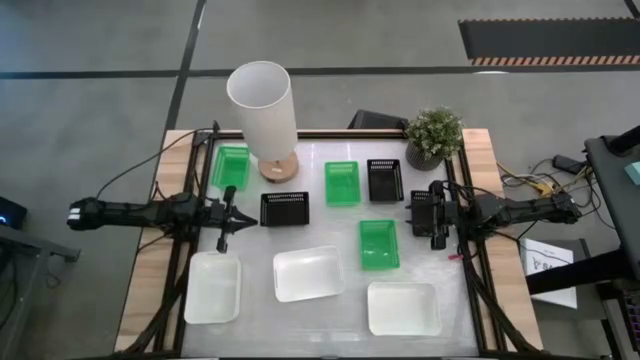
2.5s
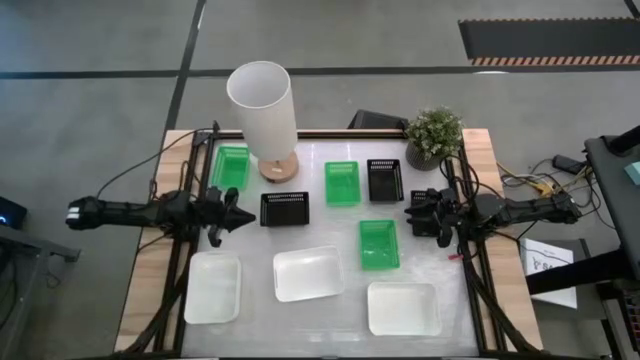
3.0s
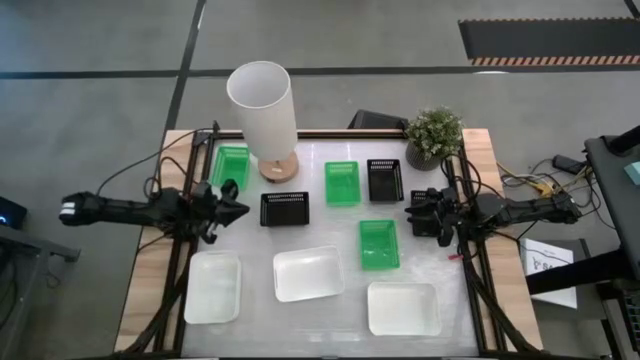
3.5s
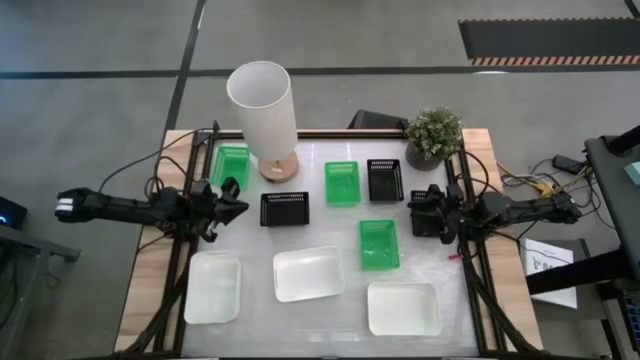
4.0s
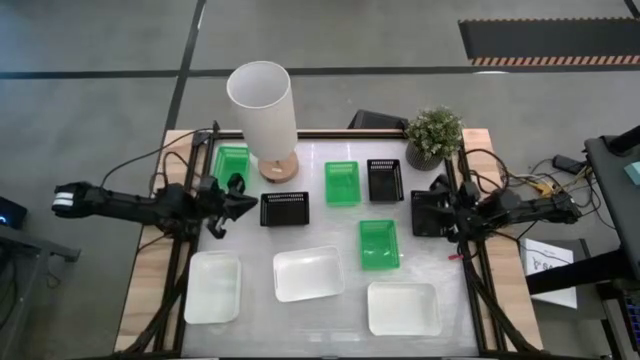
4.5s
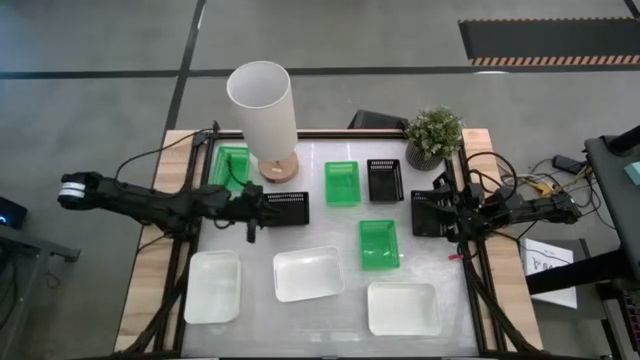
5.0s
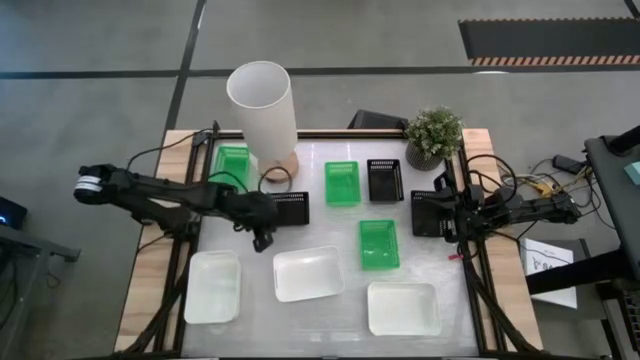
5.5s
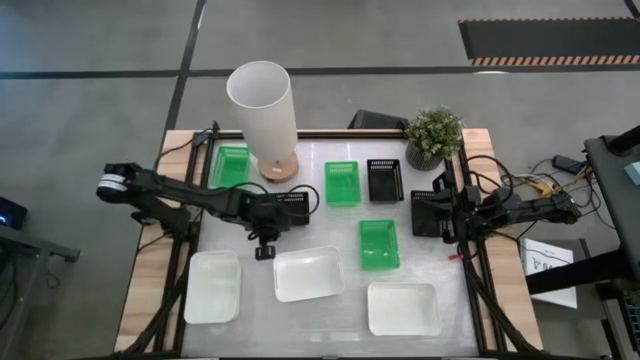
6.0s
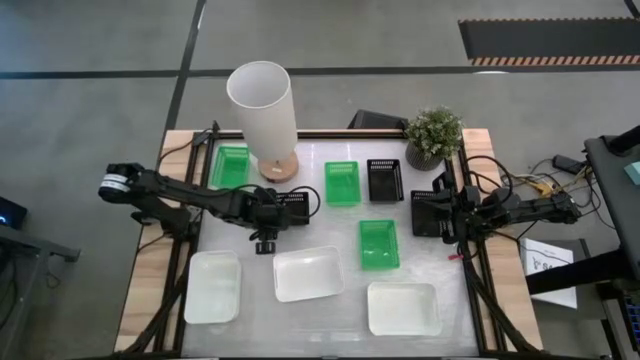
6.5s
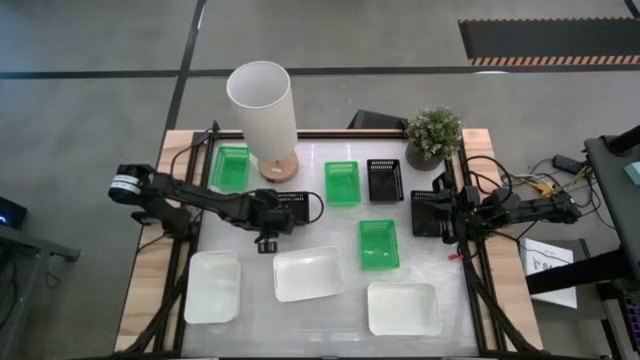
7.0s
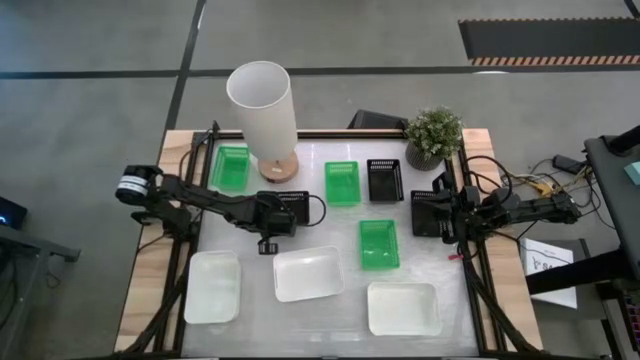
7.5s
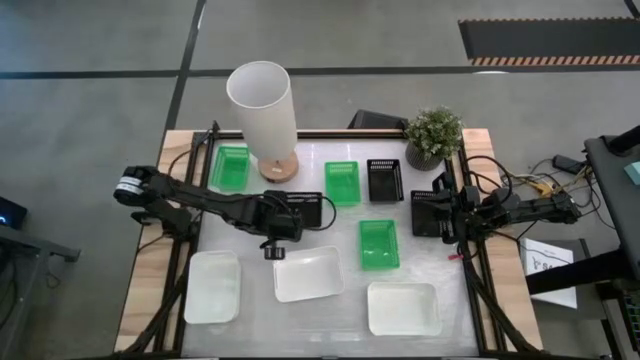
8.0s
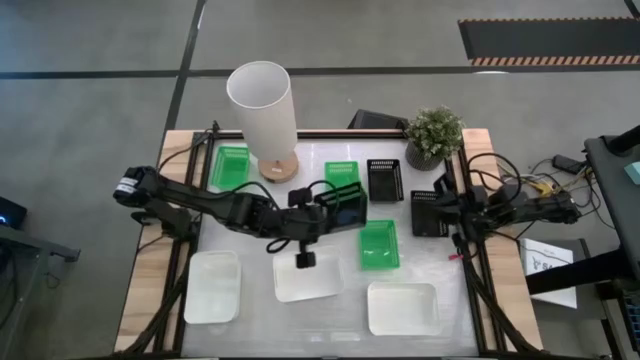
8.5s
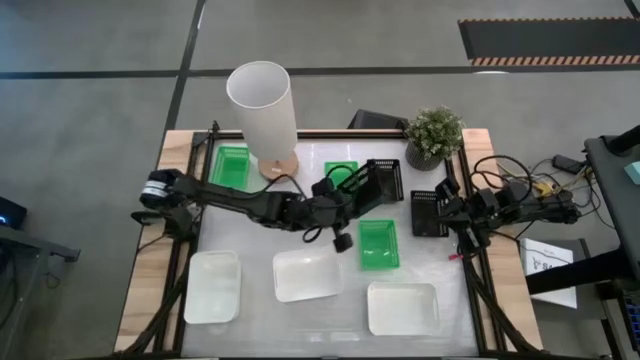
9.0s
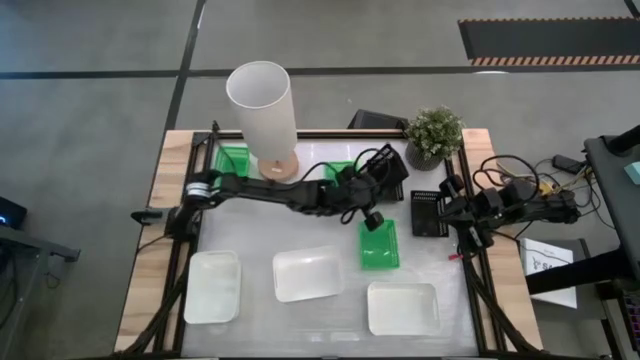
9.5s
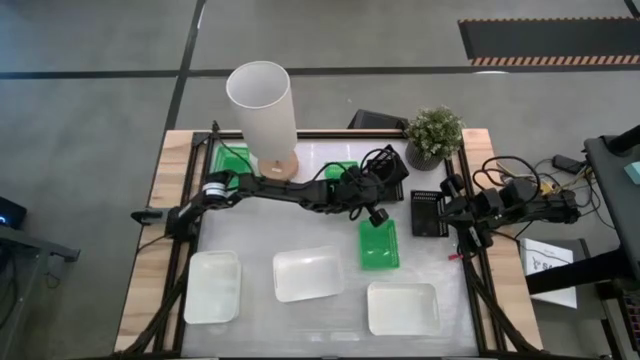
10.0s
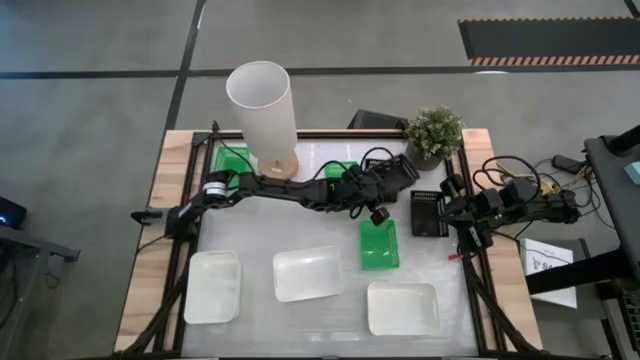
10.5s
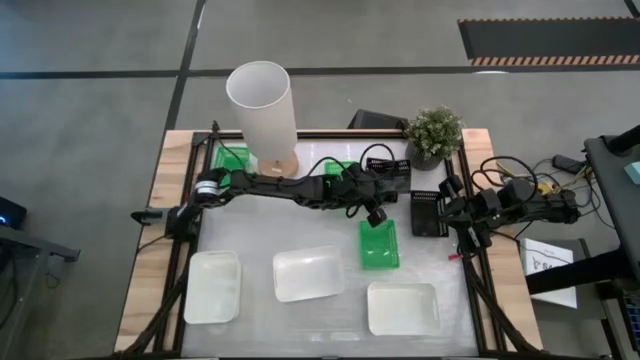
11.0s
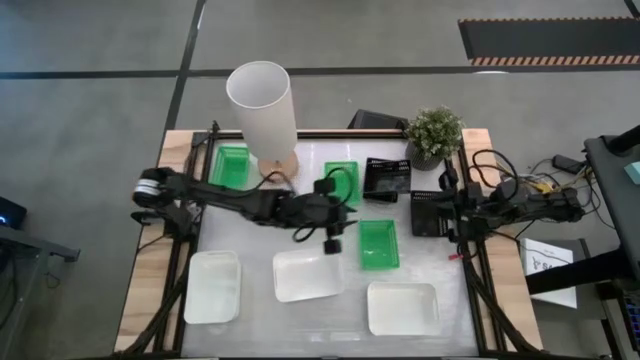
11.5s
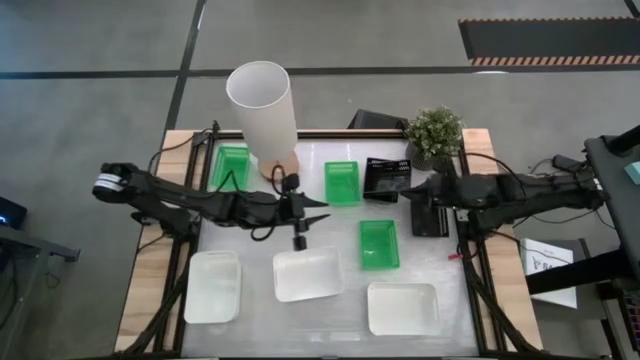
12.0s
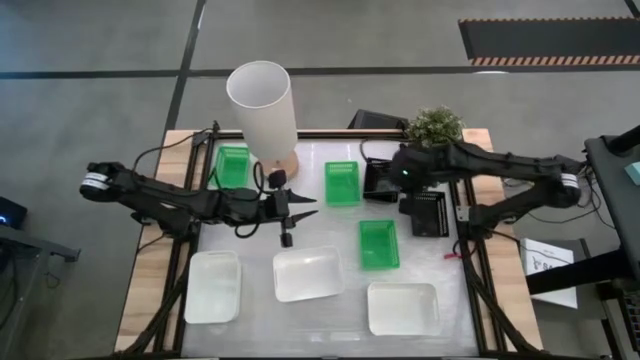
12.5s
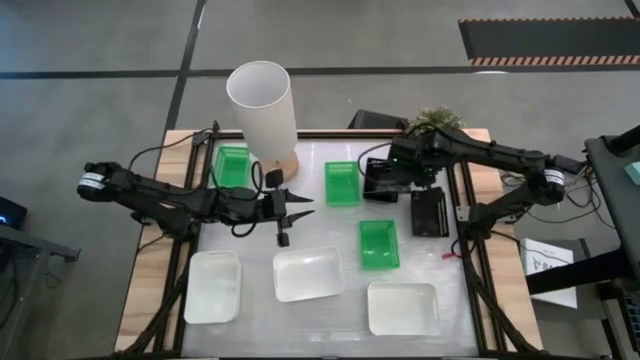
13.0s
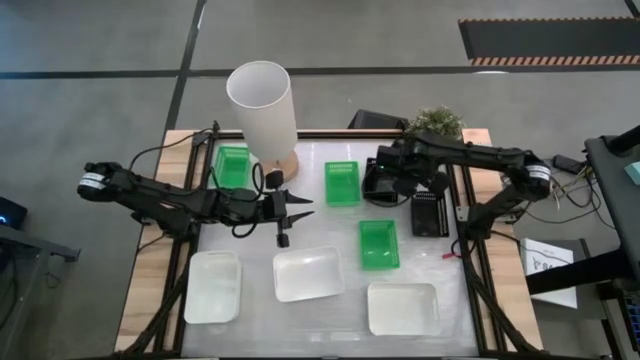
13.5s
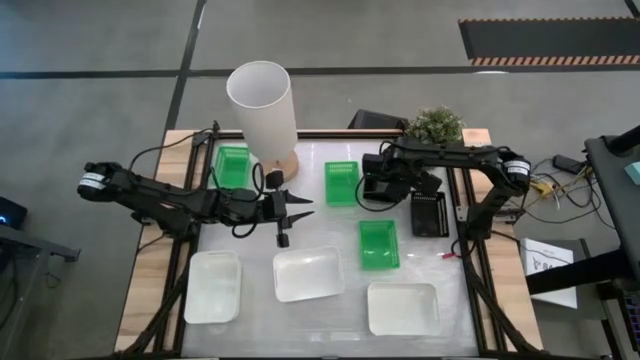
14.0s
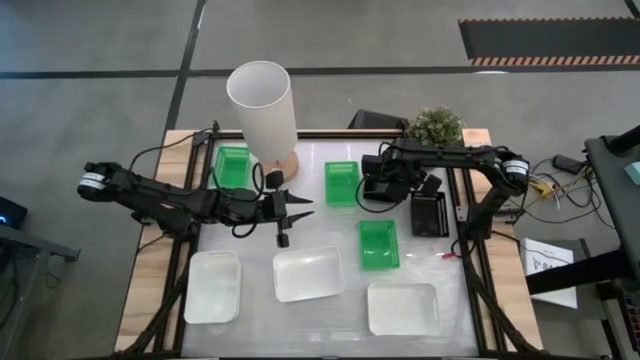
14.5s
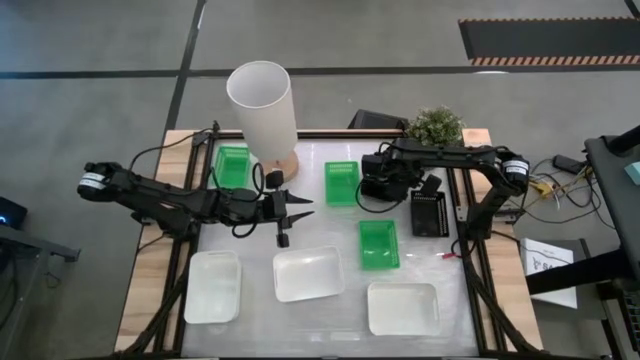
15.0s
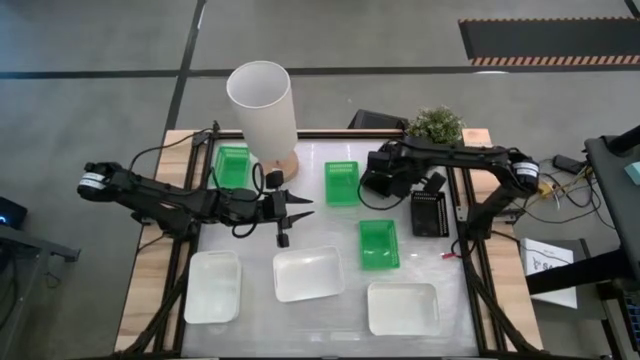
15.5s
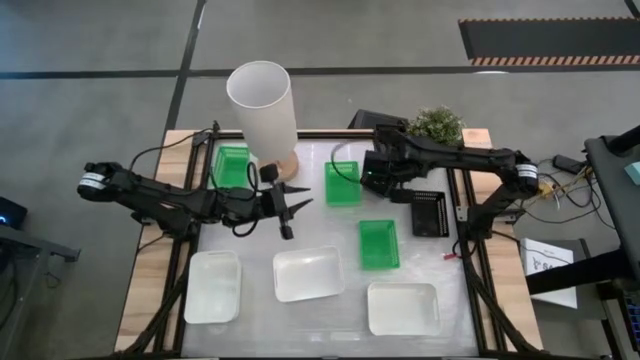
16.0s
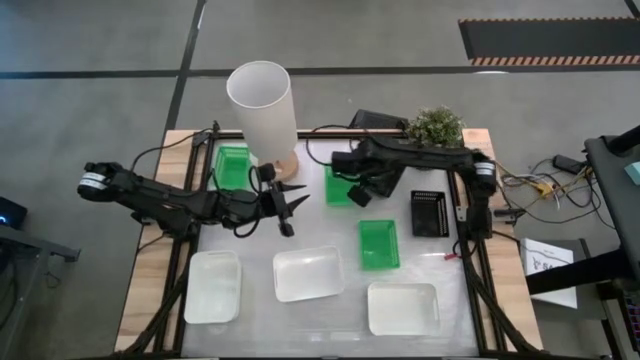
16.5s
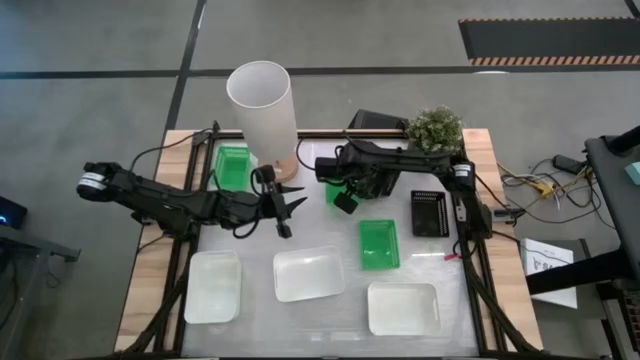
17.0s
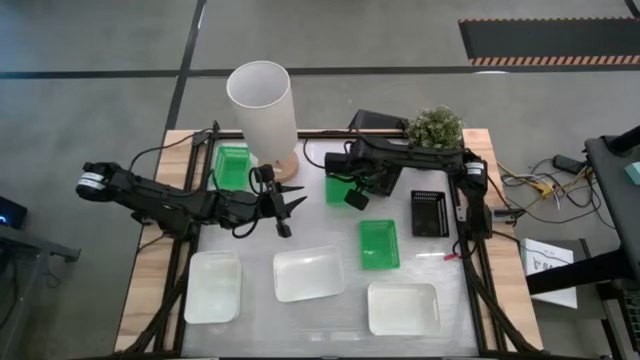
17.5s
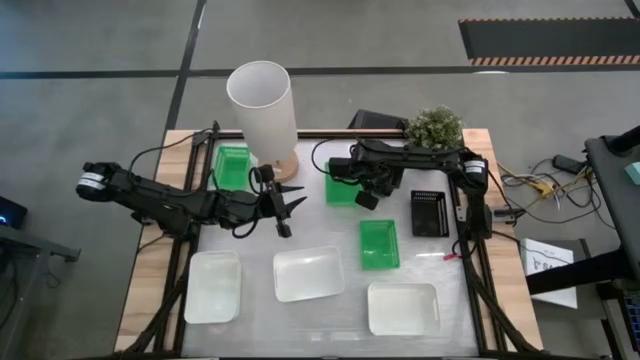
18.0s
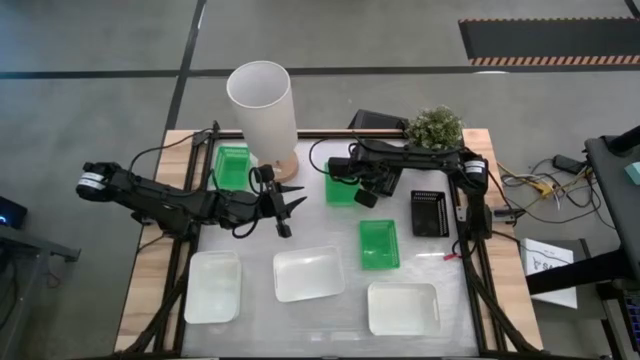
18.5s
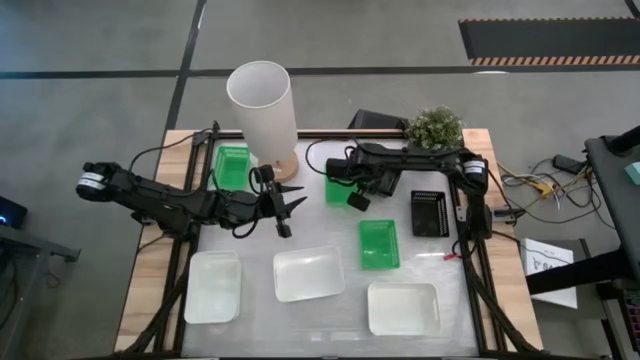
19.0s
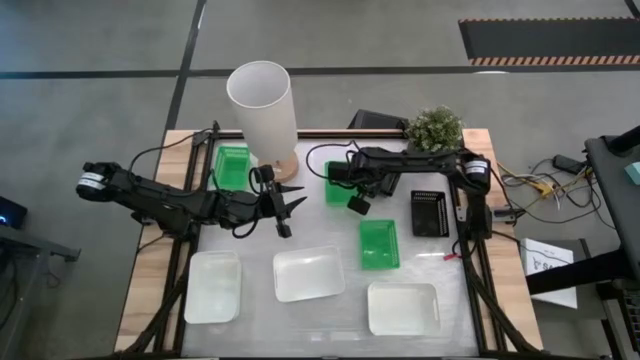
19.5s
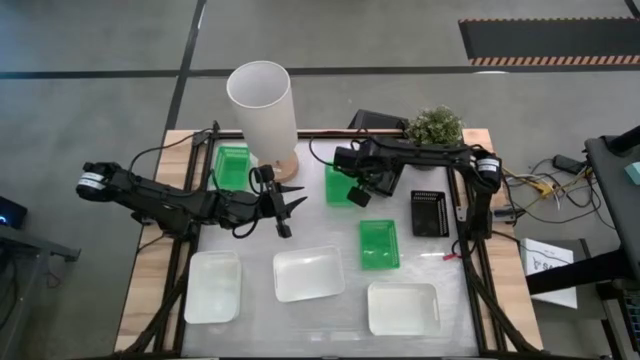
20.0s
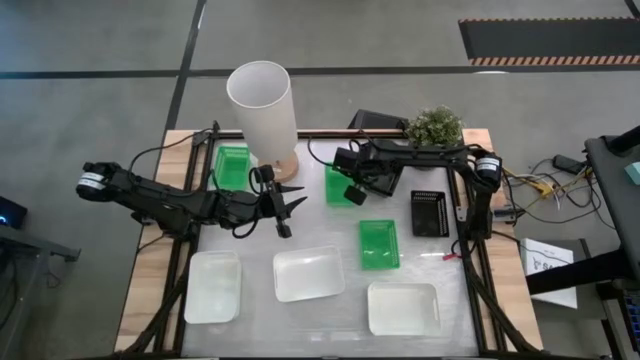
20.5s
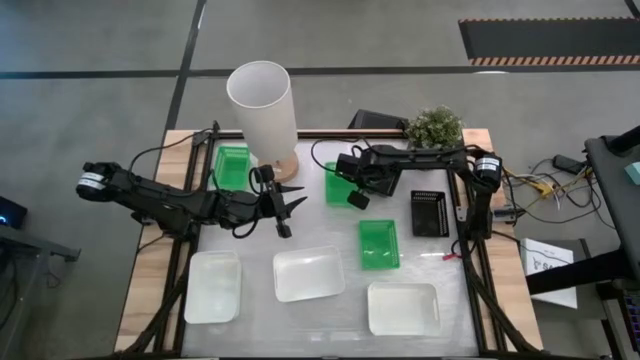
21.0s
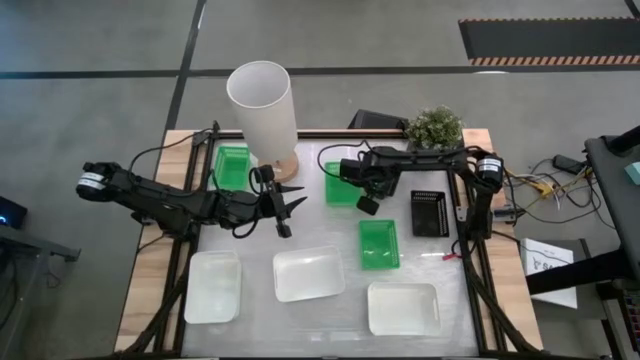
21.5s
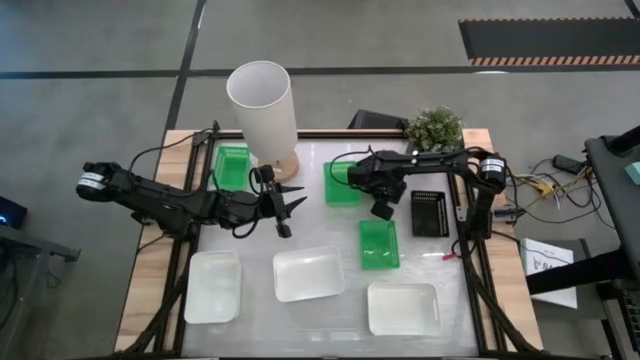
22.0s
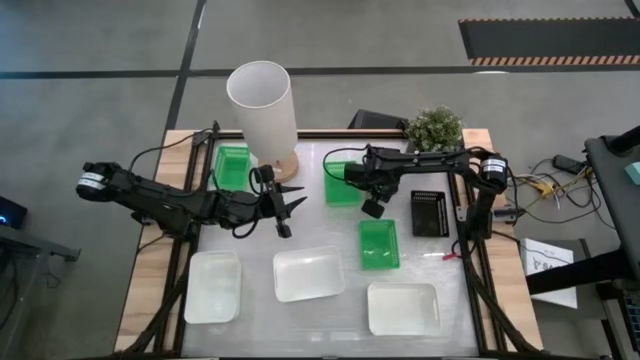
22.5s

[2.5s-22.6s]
Stack the left black bin on top of the other black bin
